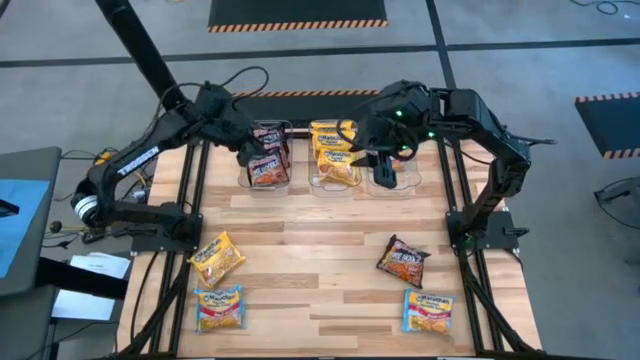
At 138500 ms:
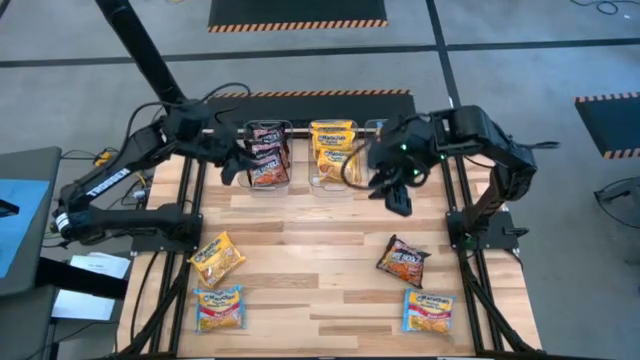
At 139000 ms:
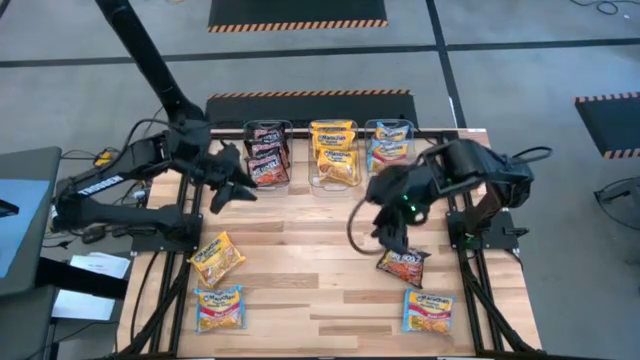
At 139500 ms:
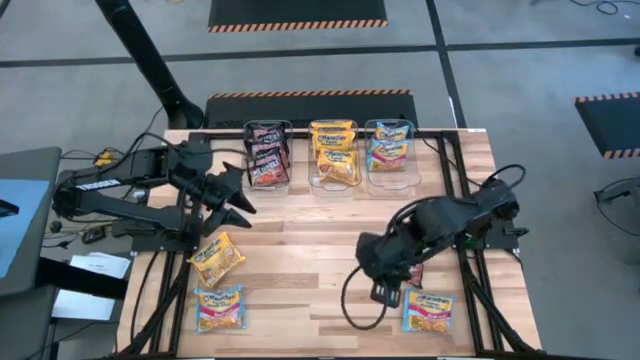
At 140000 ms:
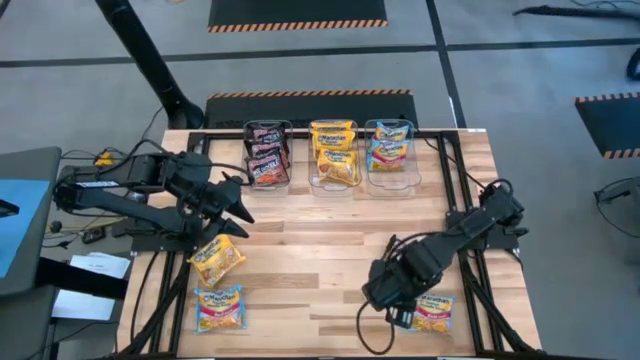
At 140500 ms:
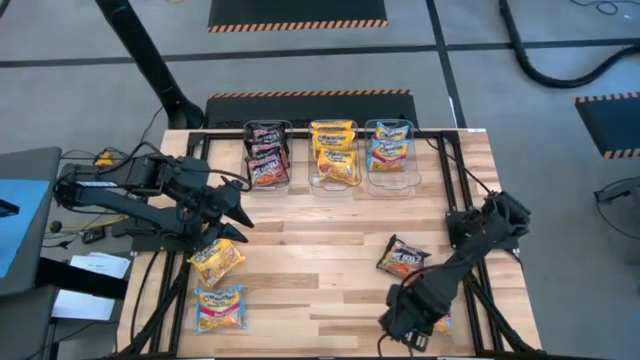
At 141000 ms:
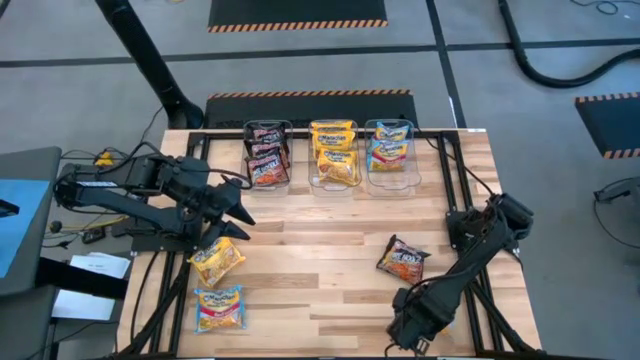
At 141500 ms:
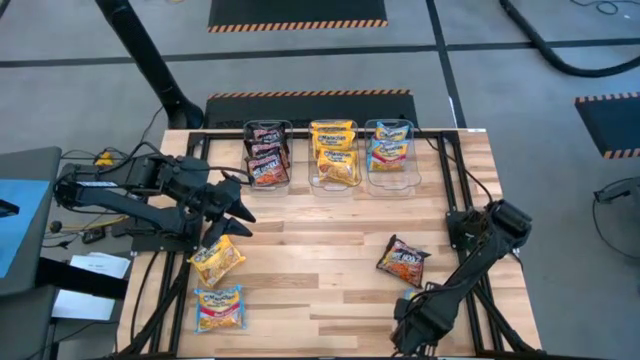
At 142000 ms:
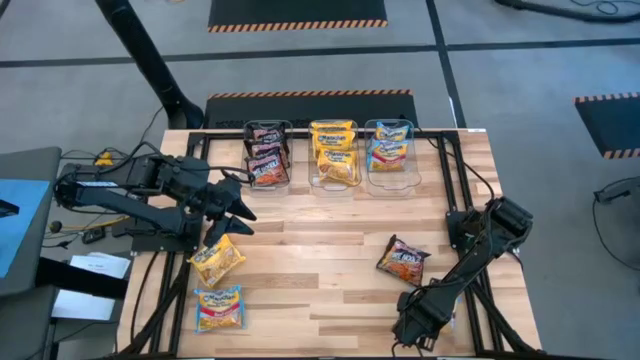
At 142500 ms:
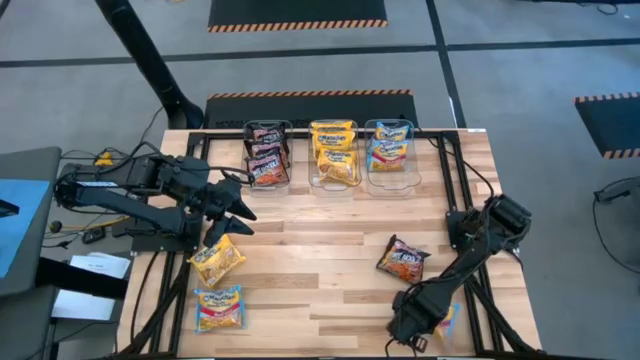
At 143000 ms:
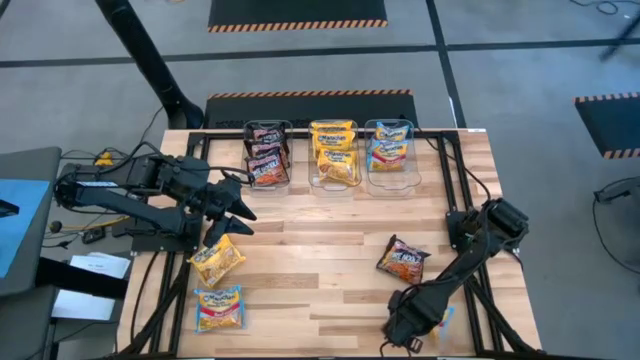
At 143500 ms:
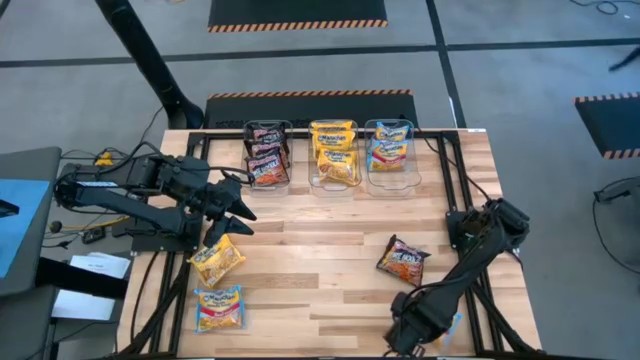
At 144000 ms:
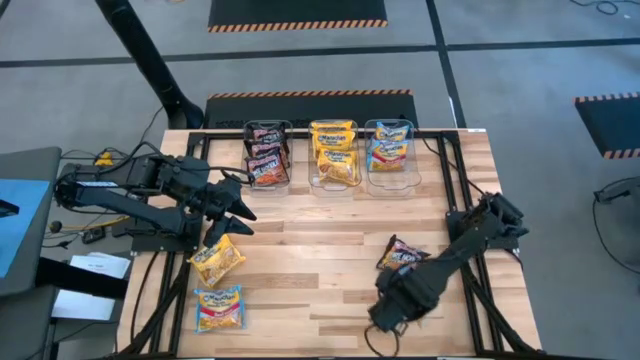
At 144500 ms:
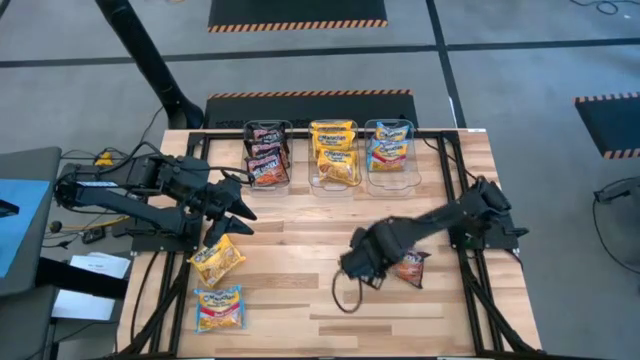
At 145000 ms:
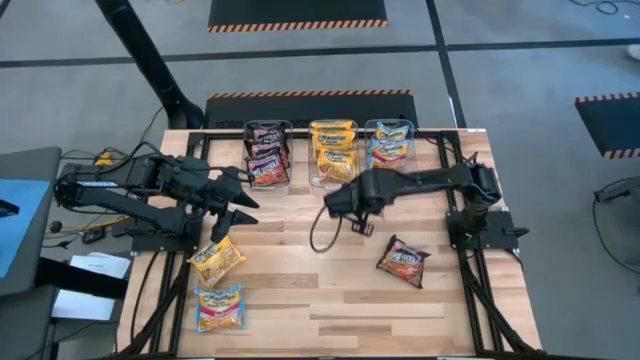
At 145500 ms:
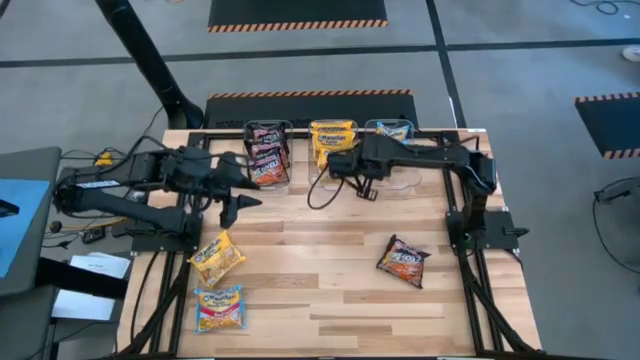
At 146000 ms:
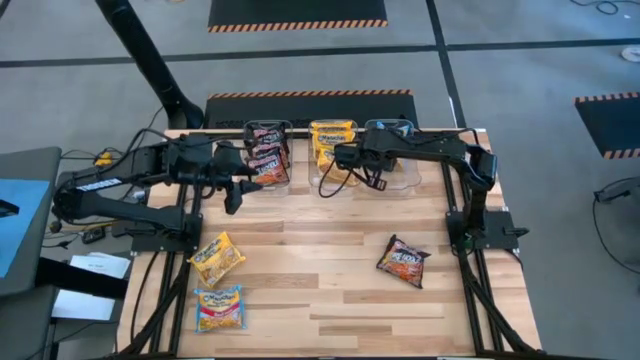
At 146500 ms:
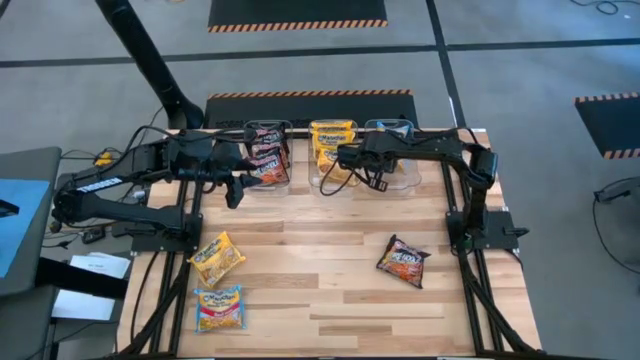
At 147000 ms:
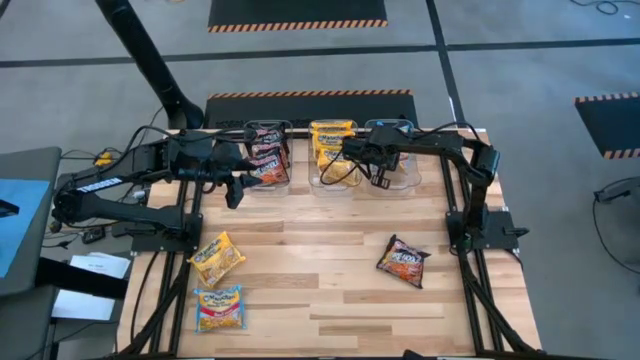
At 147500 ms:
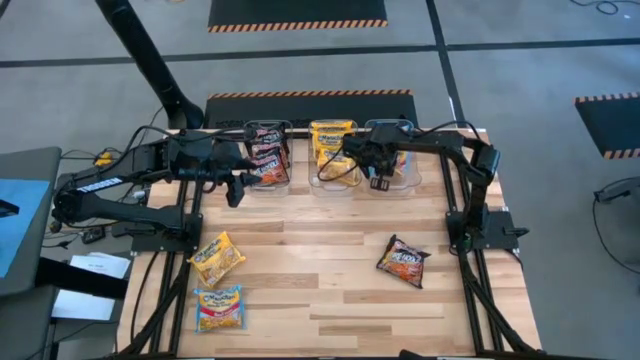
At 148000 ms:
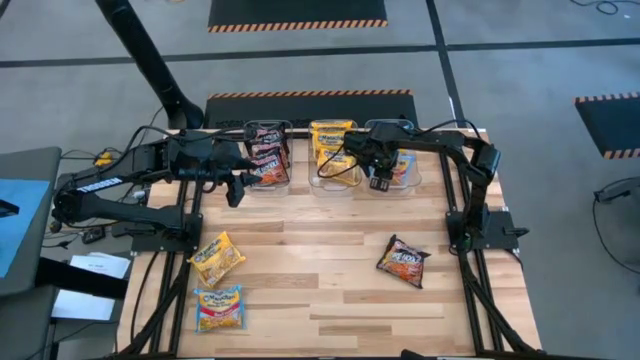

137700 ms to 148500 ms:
Task: Sort Maruchan noodles
Put the blue noodle pack into the right transparent bin

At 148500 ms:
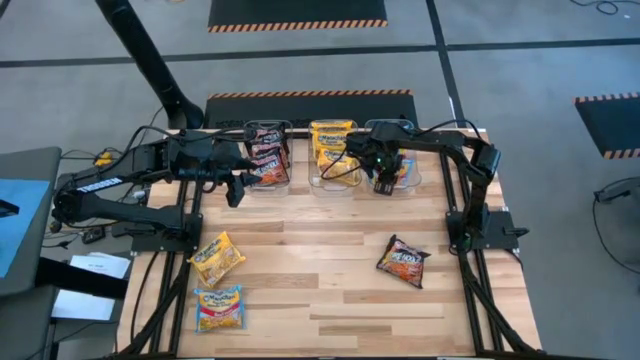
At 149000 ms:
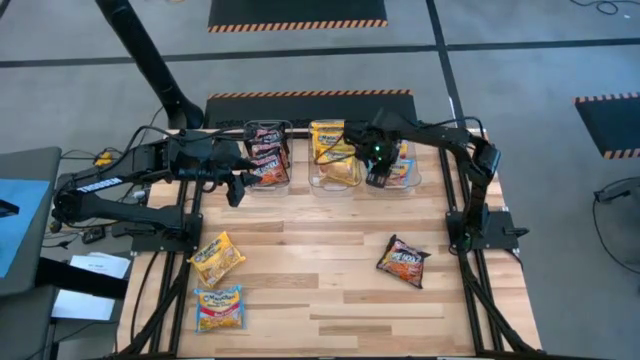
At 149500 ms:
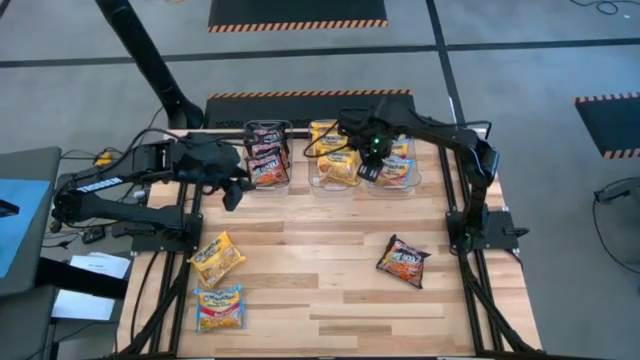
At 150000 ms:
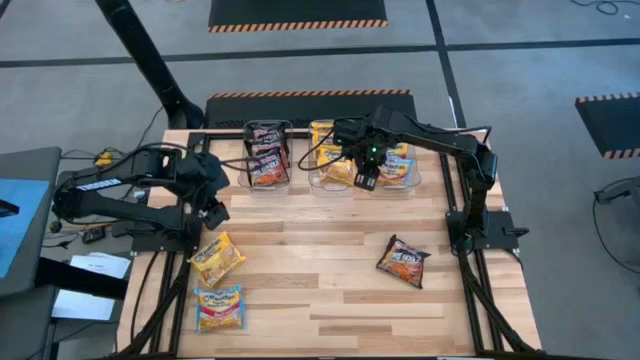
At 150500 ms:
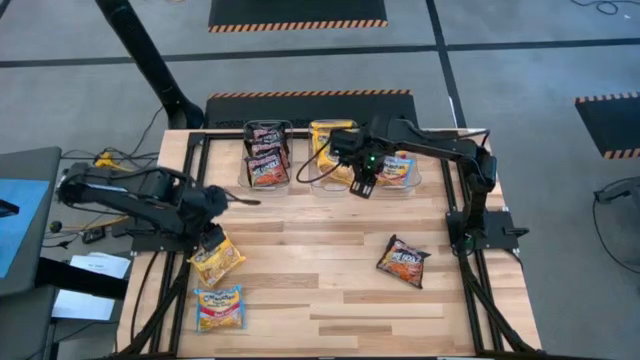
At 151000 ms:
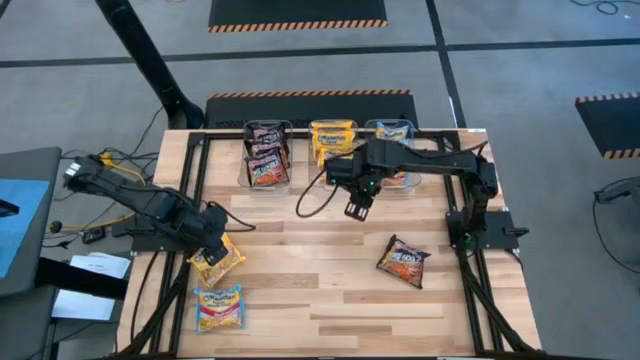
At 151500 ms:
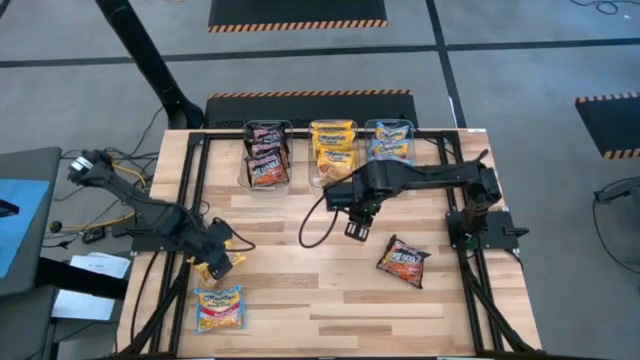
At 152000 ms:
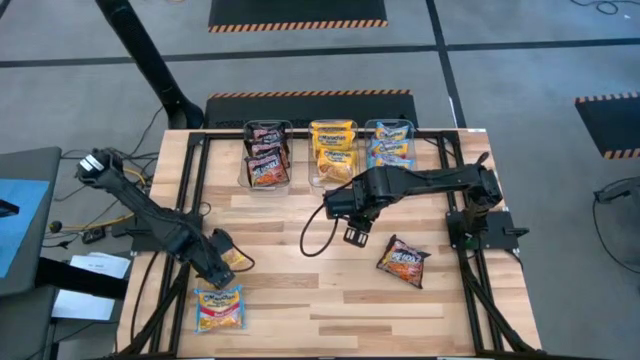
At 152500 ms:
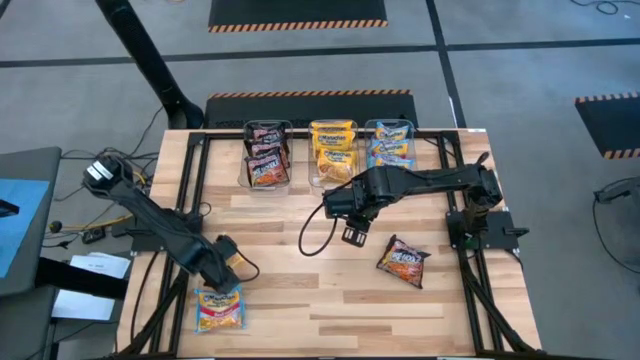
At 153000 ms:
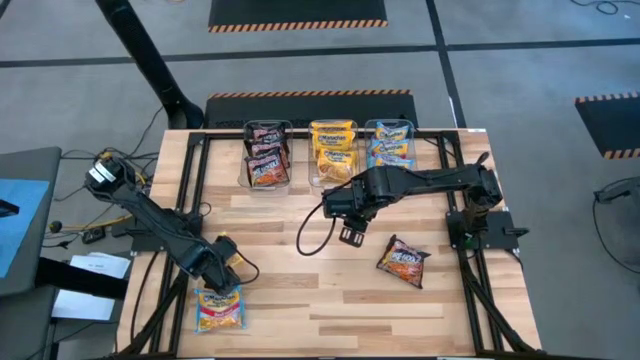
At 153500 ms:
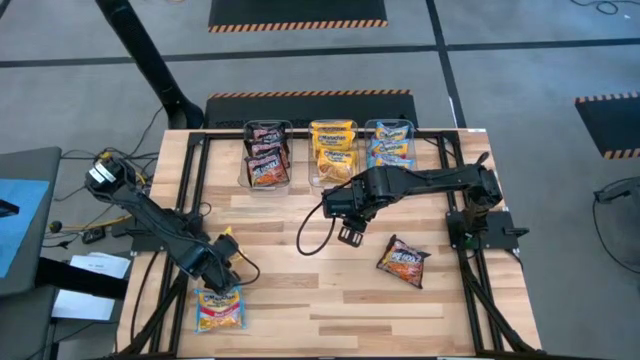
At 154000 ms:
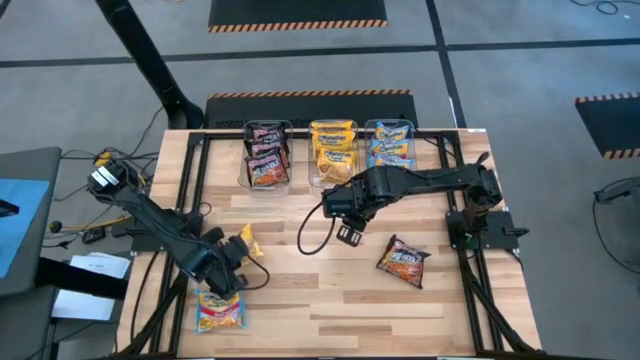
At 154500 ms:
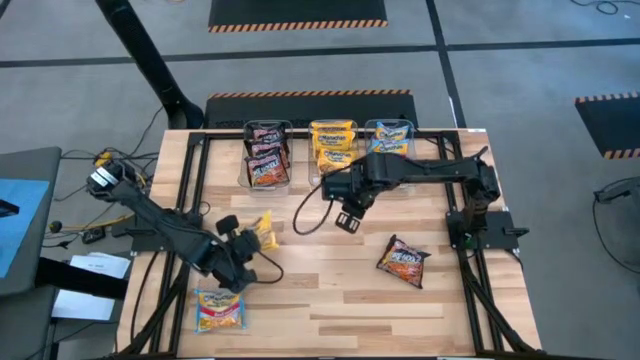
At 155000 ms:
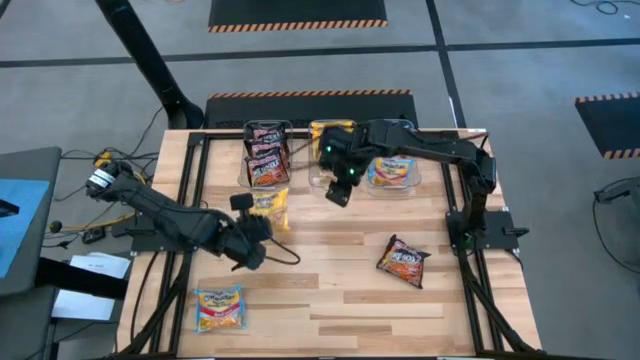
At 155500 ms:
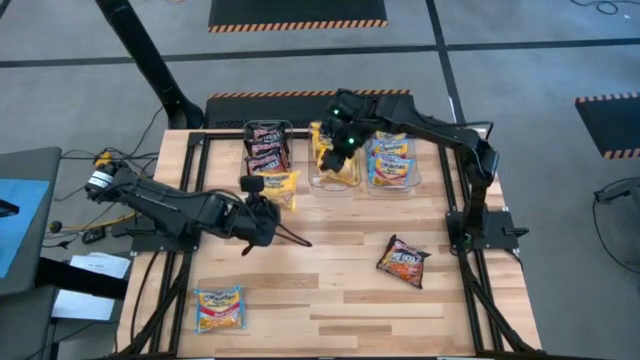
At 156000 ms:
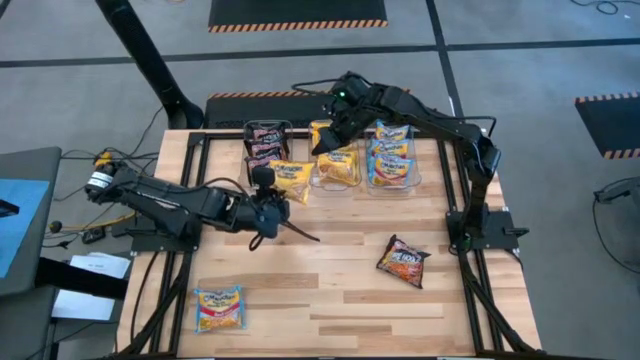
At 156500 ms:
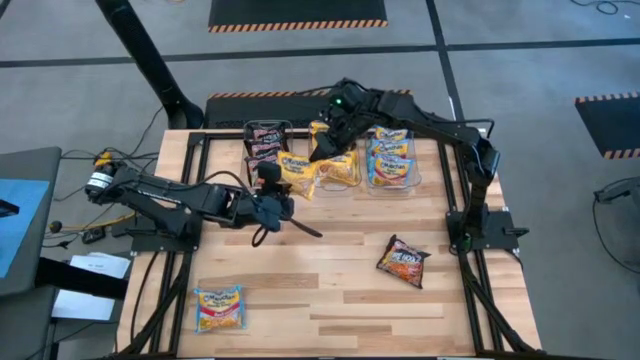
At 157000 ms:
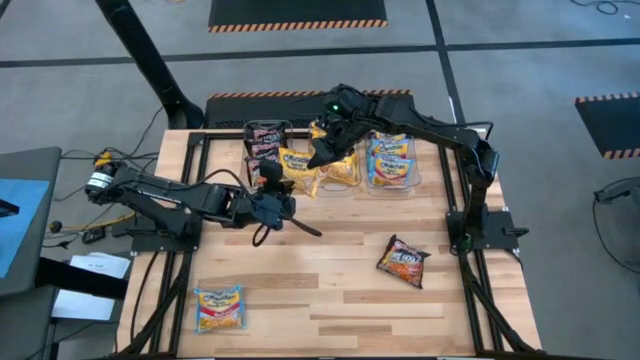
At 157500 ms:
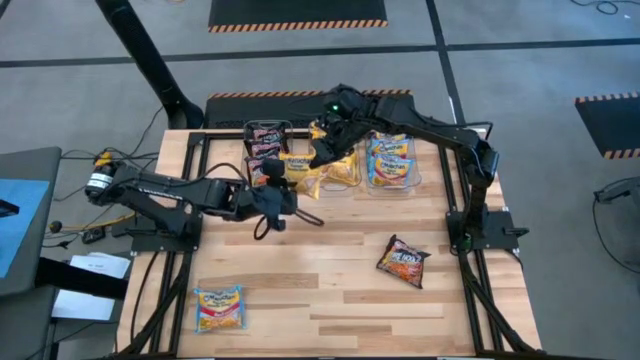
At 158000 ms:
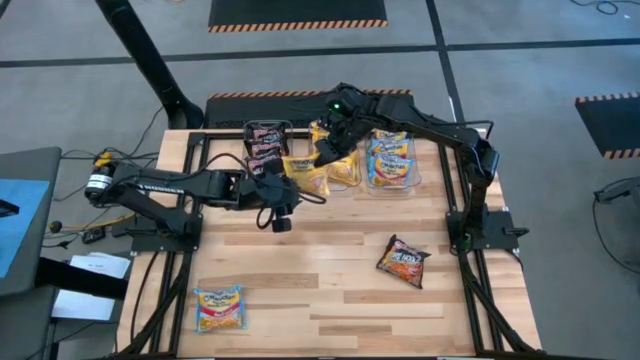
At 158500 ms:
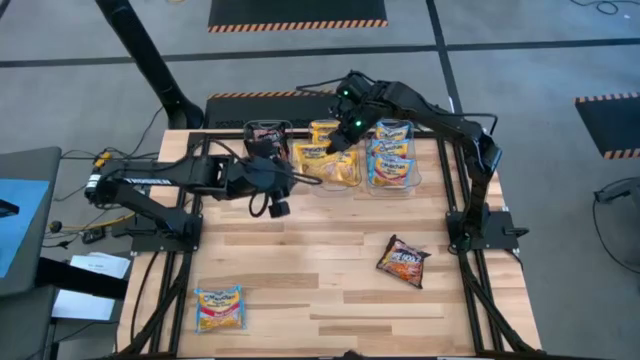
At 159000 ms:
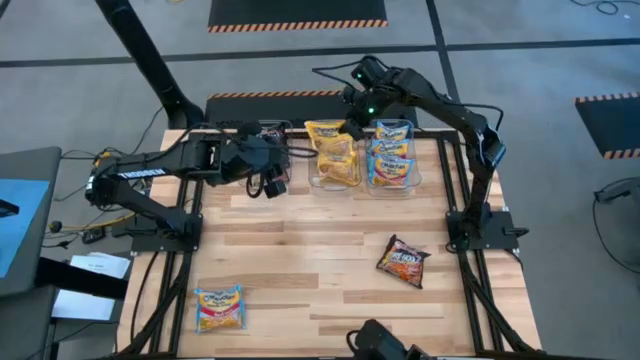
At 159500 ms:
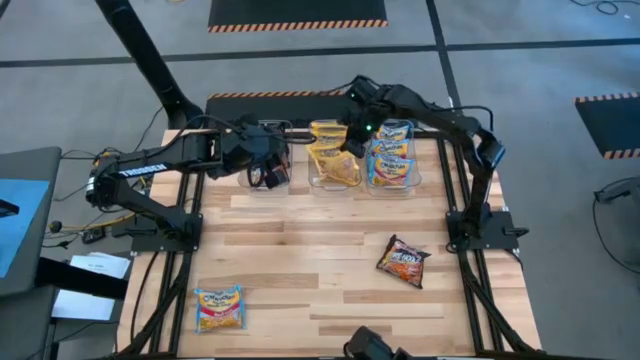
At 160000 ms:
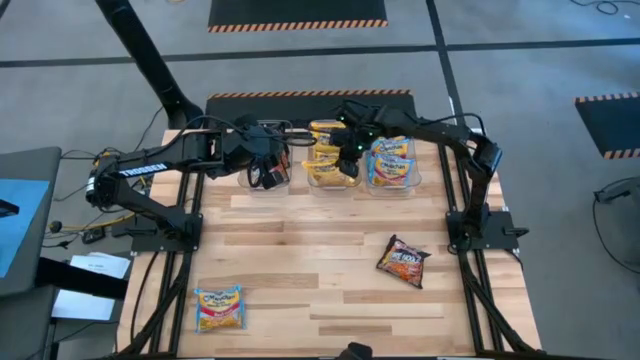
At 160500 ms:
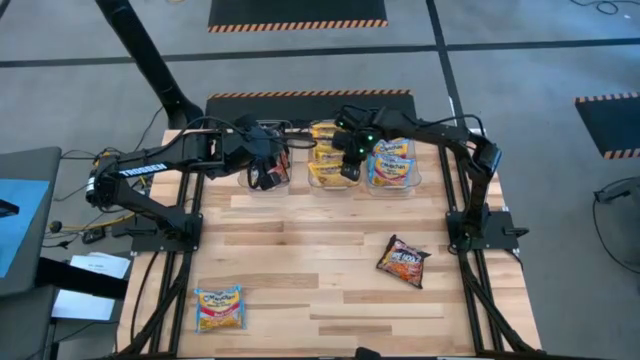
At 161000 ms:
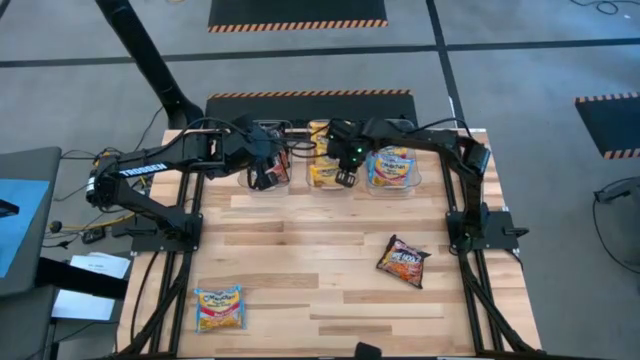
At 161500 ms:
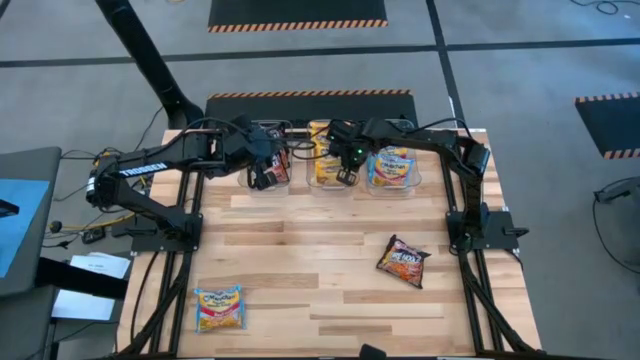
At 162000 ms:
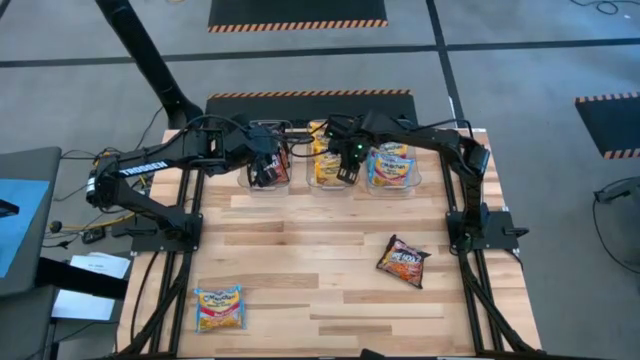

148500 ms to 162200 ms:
Put the yellow noodle pack into the center transparent bin
